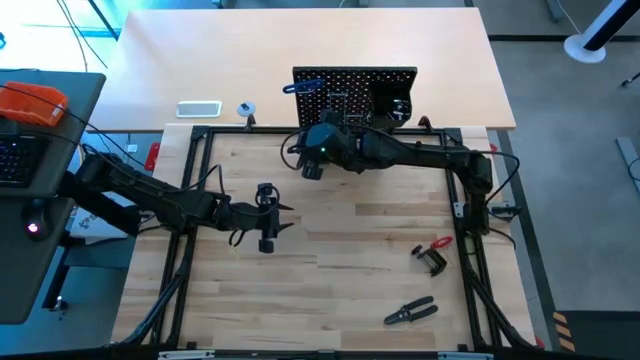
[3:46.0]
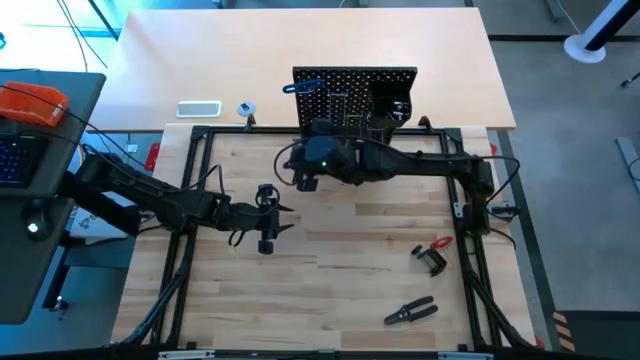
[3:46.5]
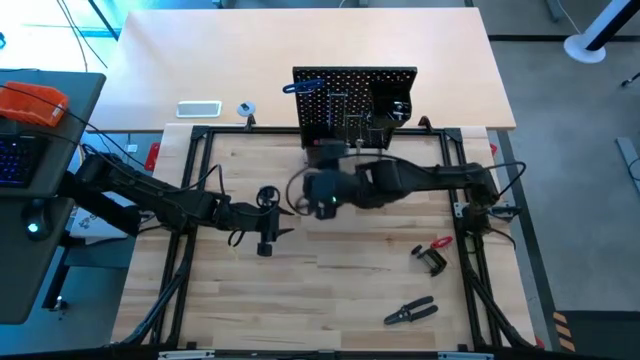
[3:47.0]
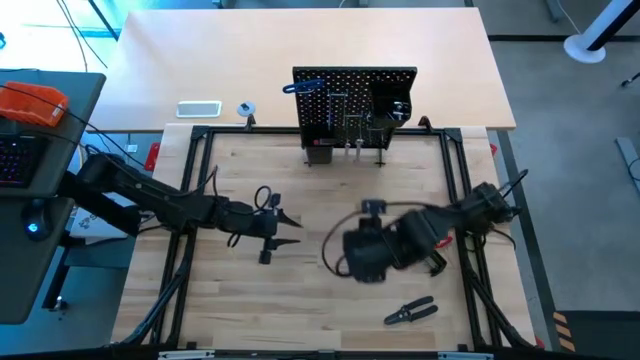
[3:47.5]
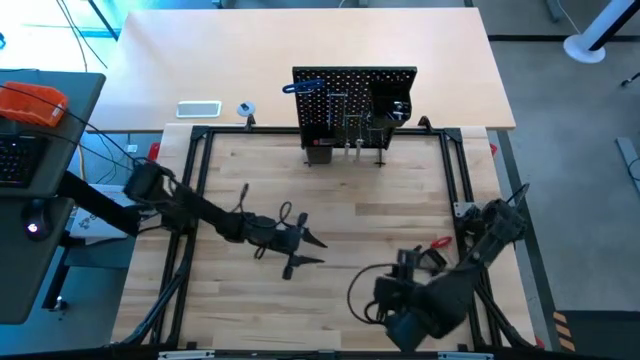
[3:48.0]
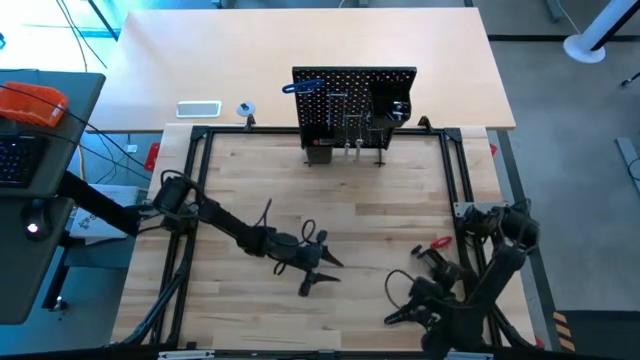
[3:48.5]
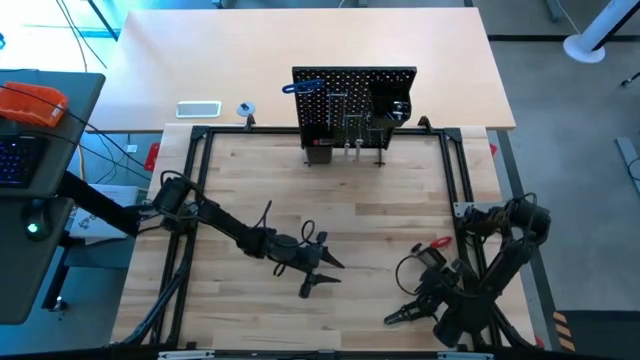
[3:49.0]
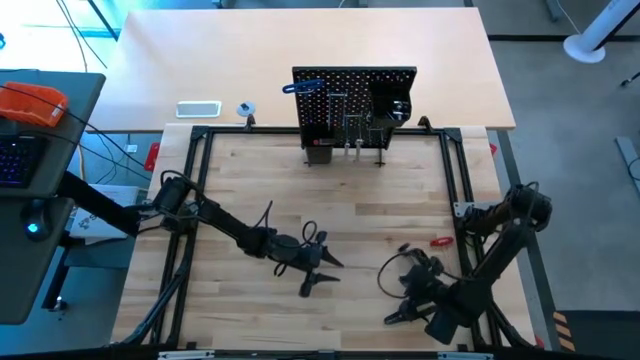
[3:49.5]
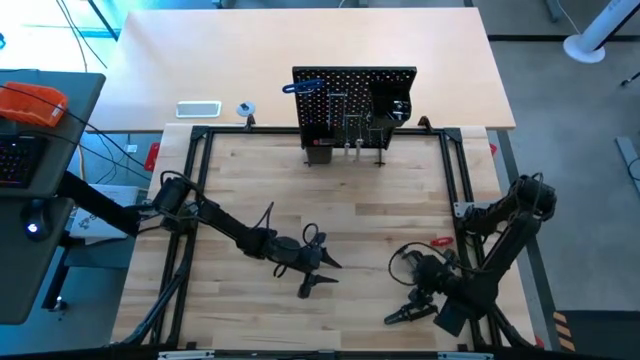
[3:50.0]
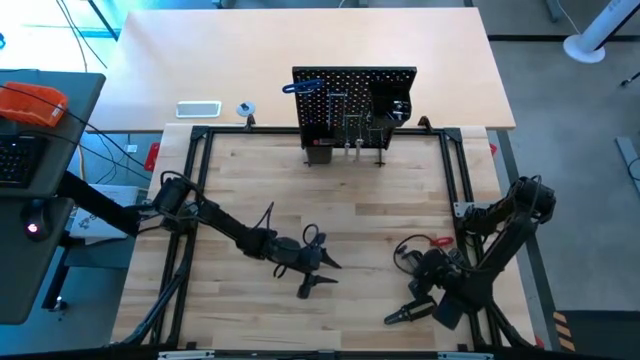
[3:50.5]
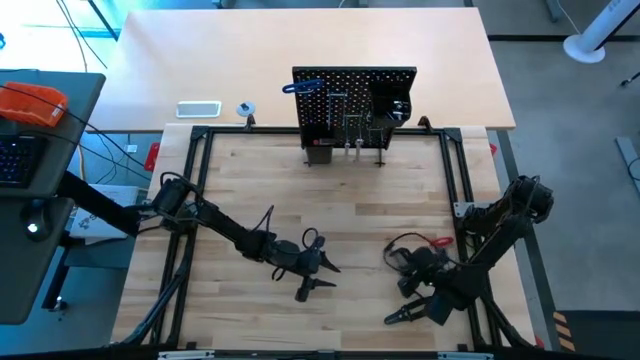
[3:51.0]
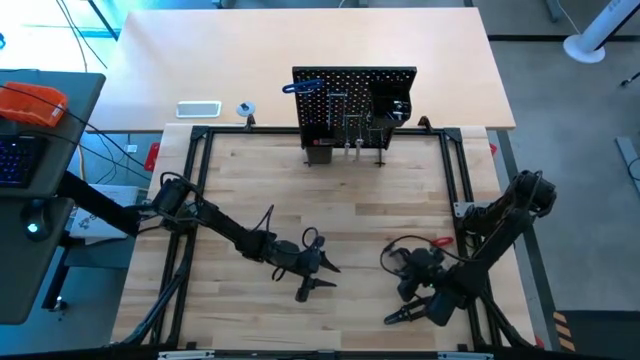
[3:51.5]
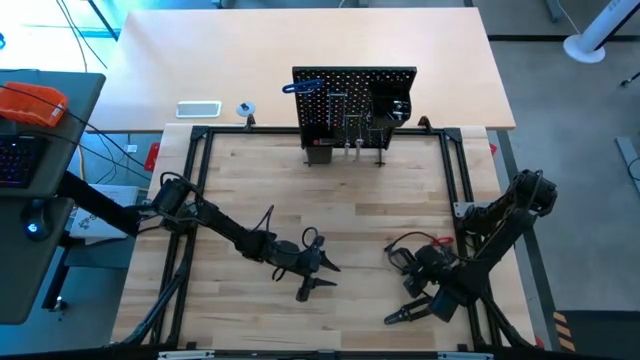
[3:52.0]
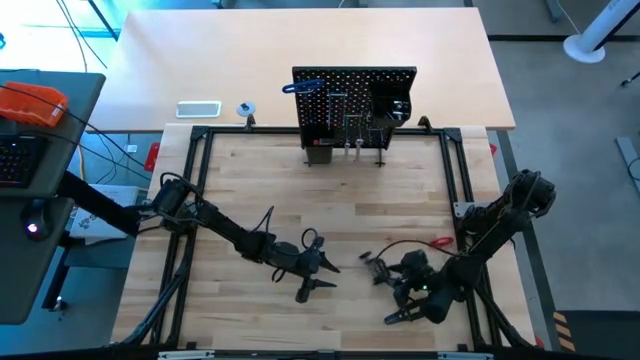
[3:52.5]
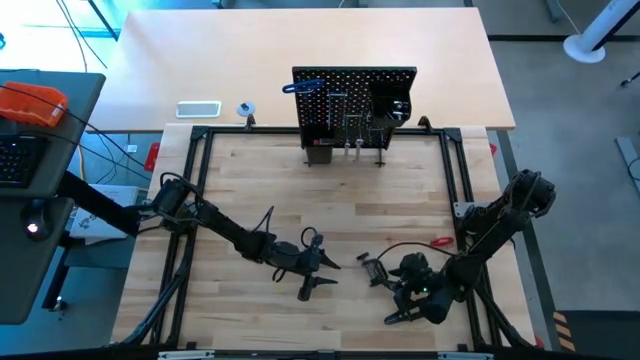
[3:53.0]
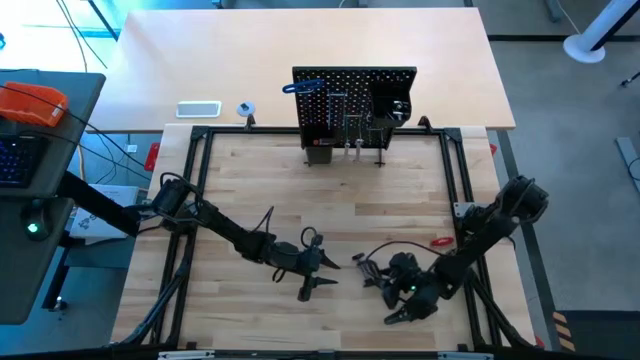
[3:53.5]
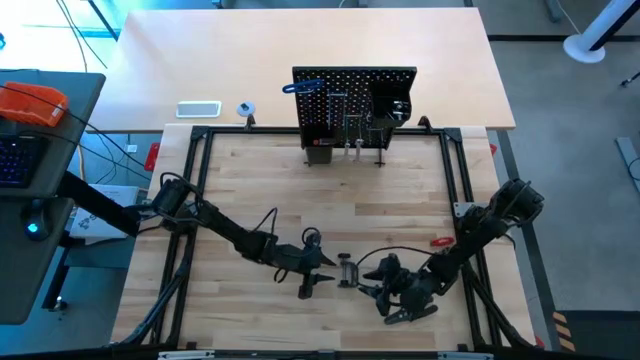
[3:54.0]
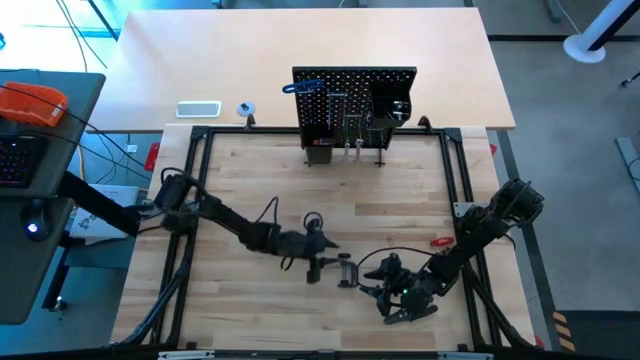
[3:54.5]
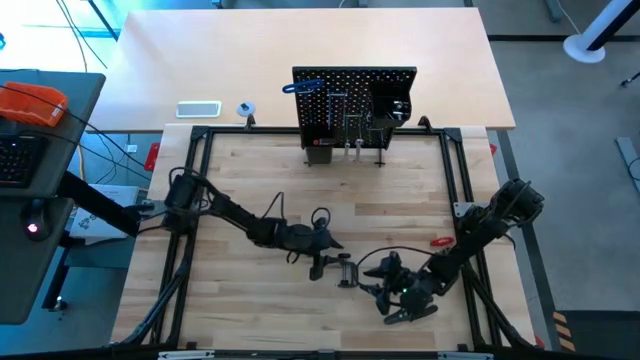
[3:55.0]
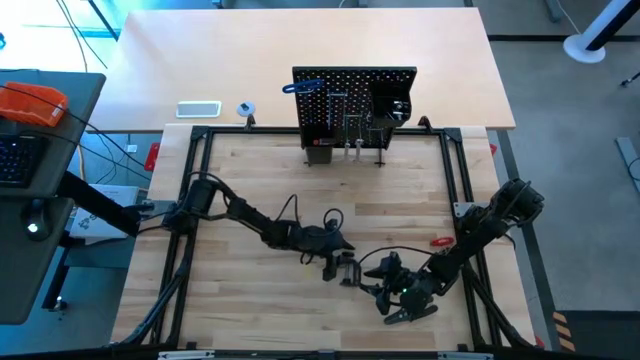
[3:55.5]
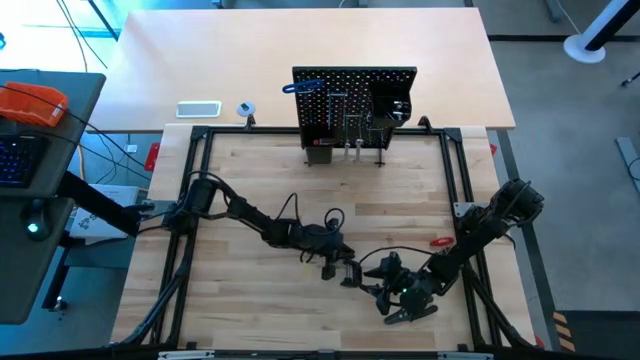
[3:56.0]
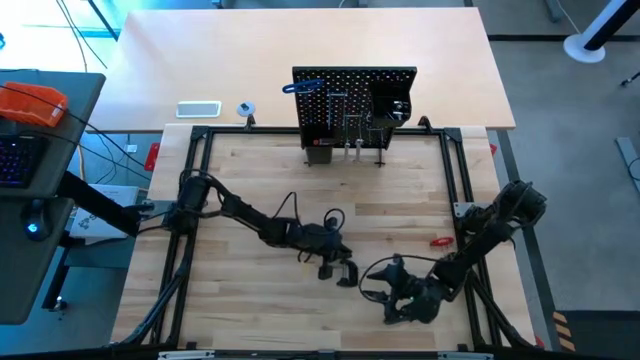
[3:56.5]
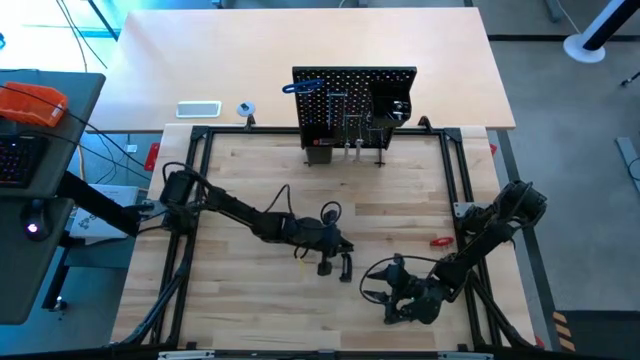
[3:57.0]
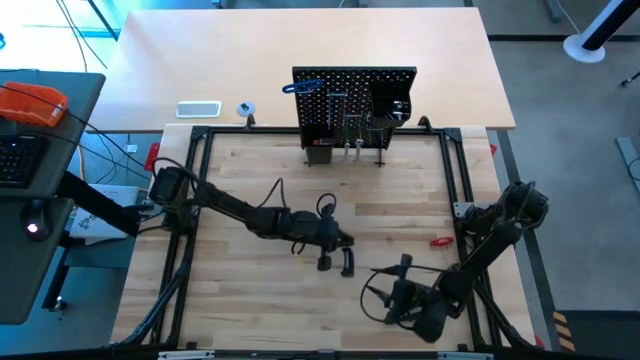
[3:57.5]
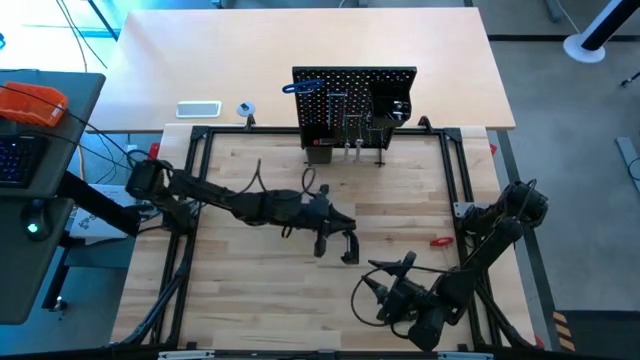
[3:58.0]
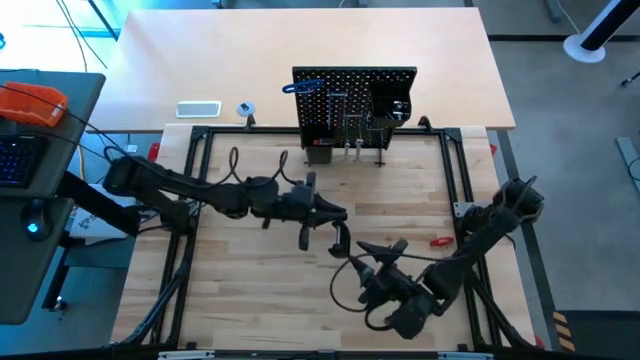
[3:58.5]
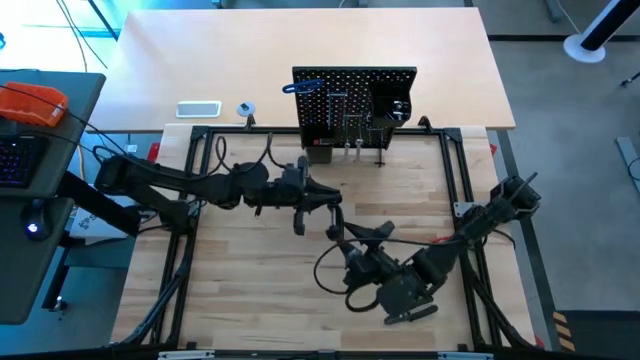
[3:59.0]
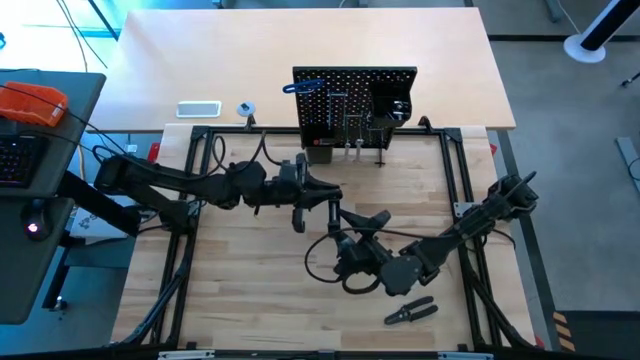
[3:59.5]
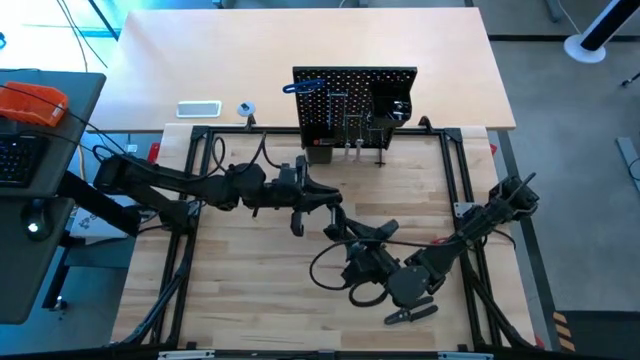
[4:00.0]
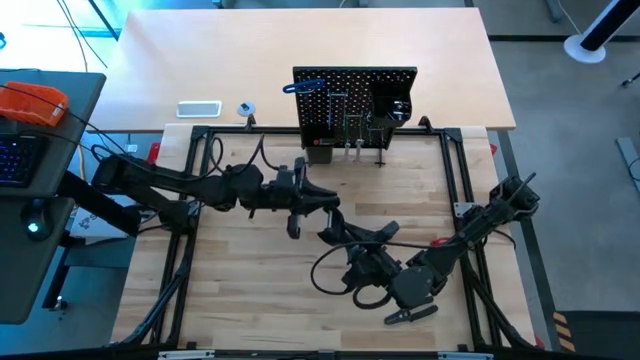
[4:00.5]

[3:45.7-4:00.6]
Task: Hang tools onto peg board
Hang the c-clamp on the pegboard

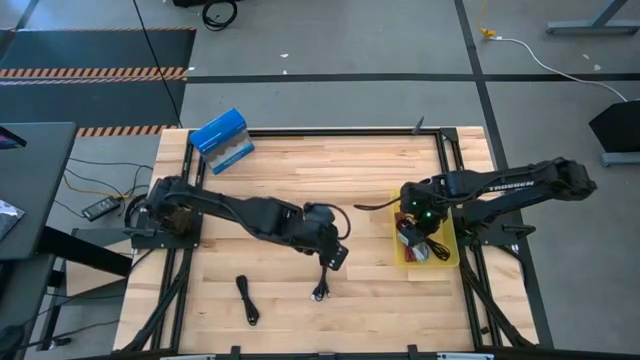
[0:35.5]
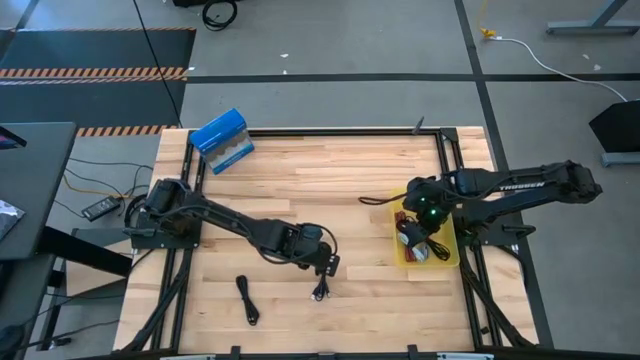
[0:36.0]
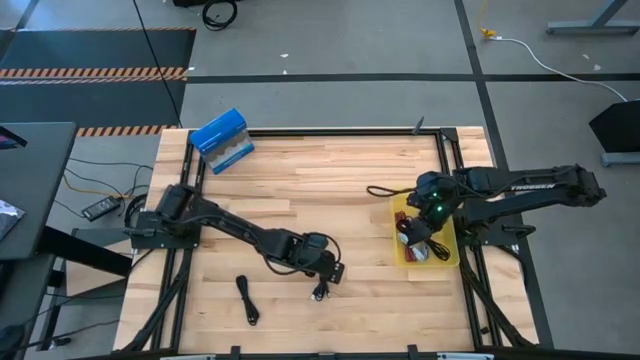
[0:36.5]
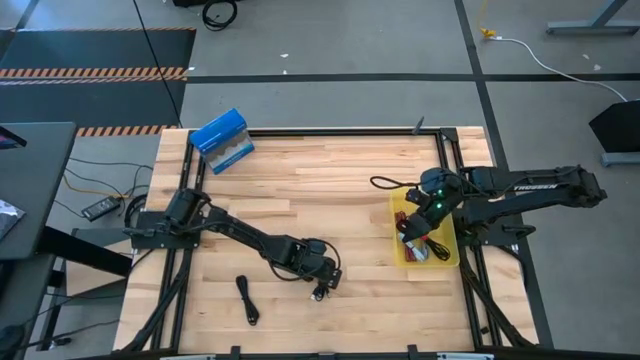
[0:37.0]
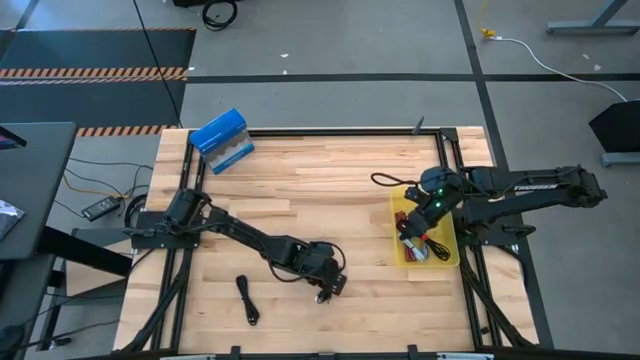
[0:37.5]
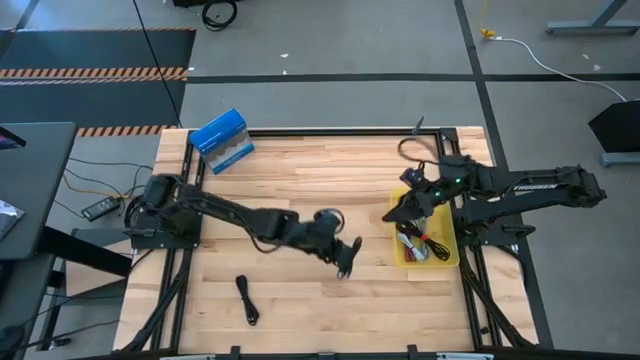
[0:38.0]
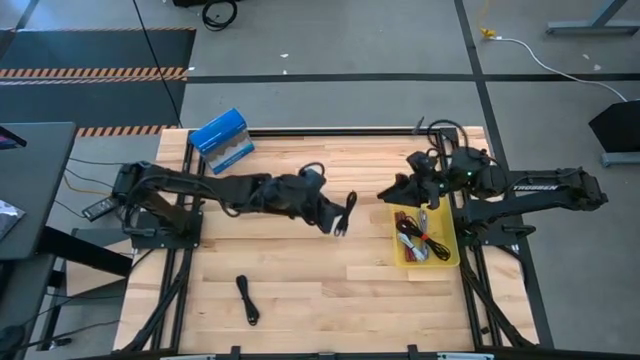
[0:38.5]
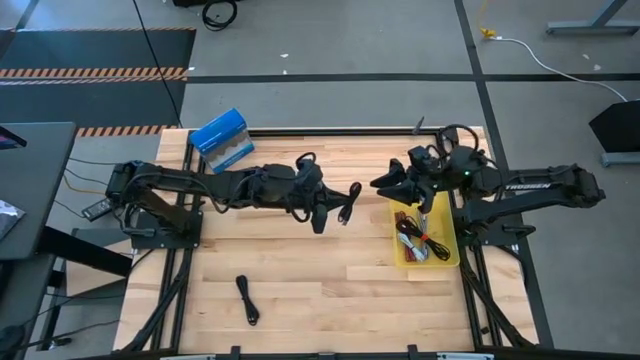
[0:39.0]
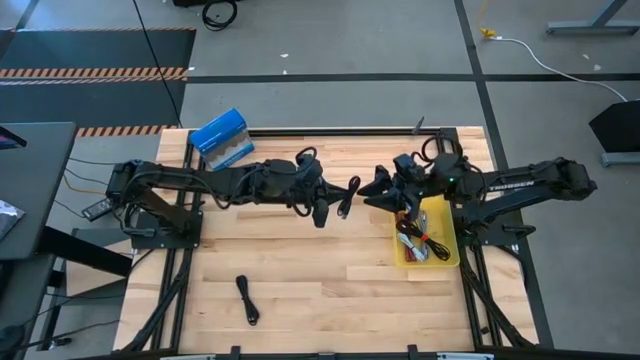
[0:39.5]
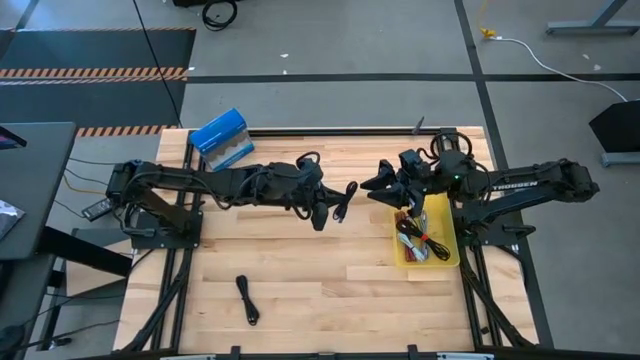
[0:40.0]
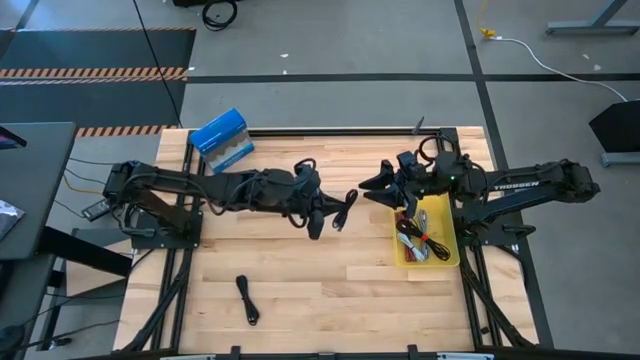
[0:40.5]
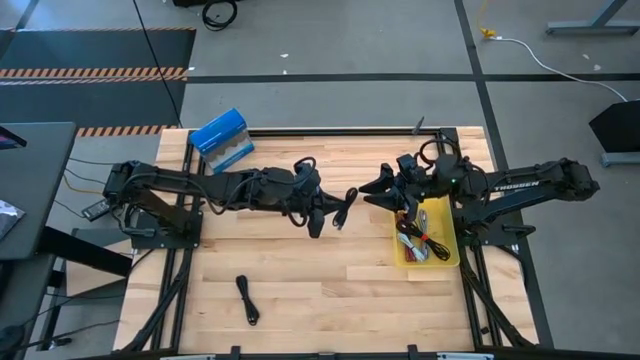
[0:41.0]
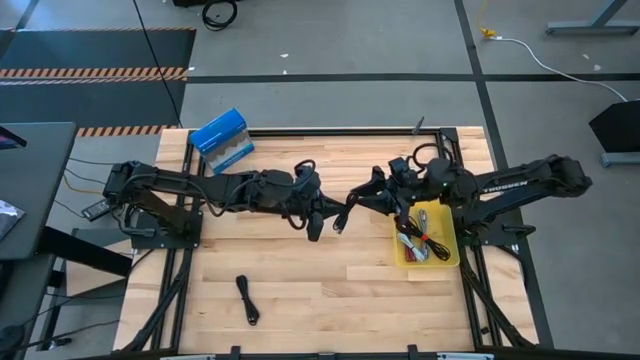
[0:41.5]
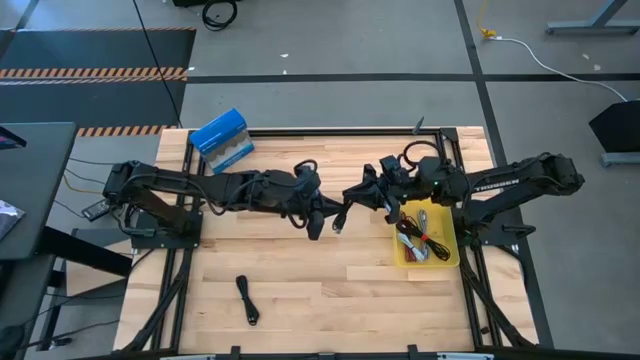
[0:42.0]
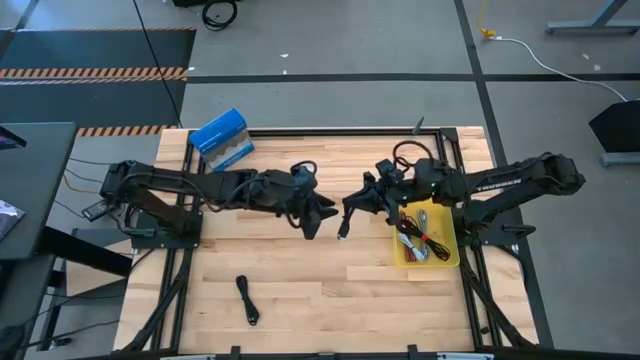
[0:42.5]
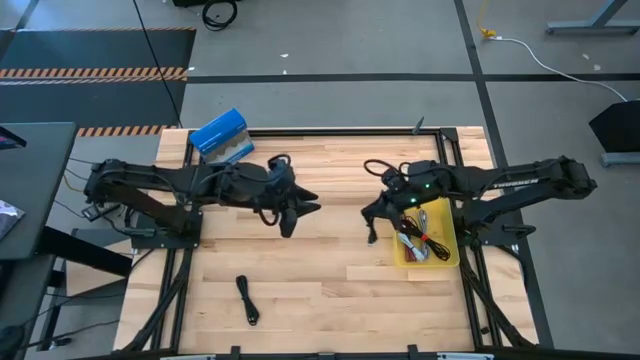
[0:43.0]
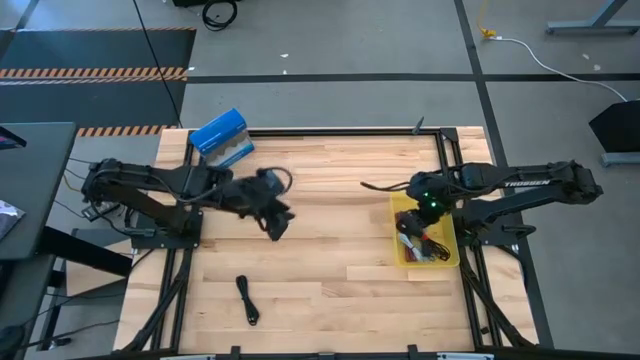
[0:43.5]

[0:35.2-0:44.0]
Task: Pick and place USB-C Cables
Put the right black charger cable into the yellow bin
